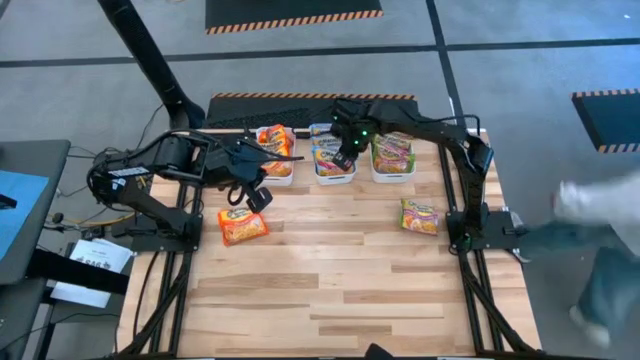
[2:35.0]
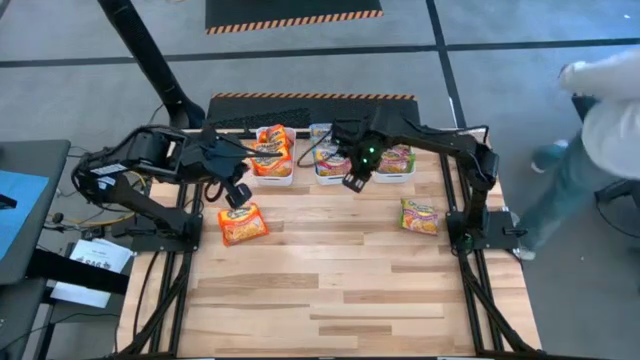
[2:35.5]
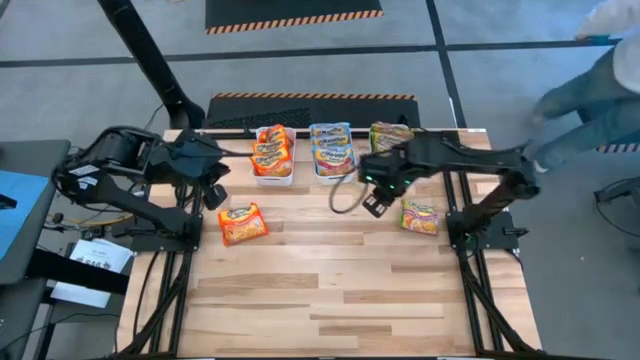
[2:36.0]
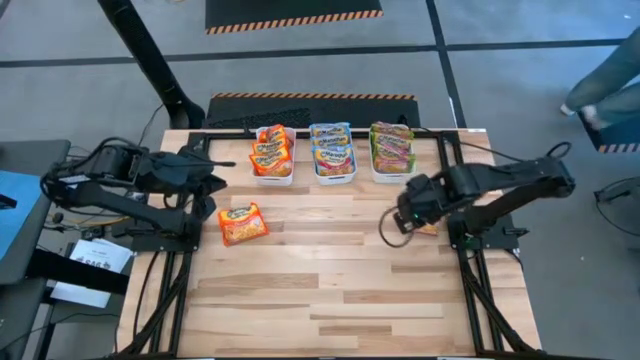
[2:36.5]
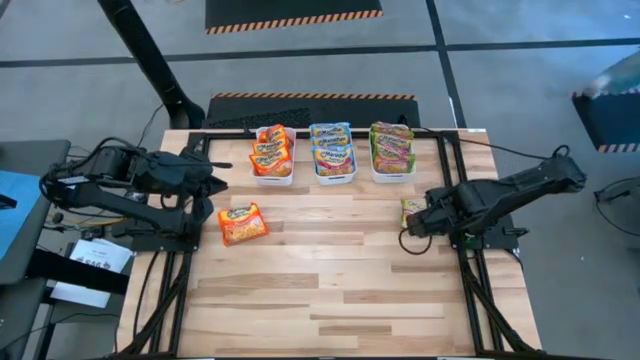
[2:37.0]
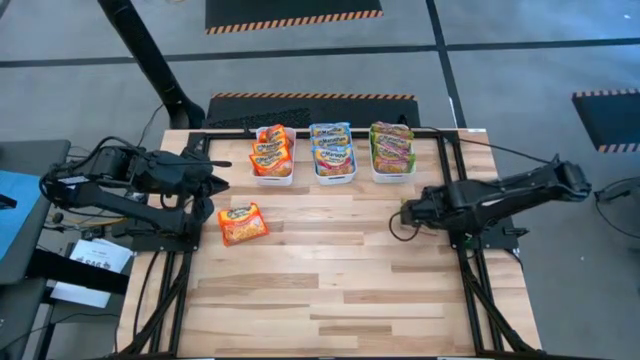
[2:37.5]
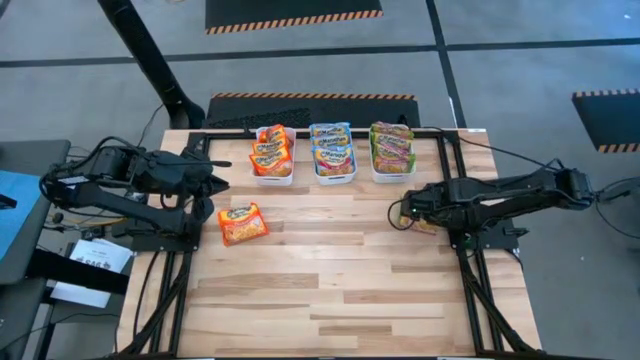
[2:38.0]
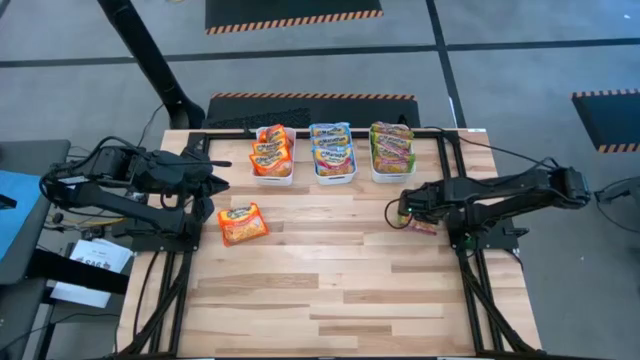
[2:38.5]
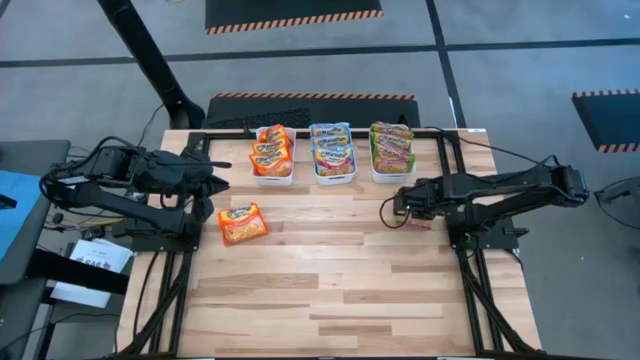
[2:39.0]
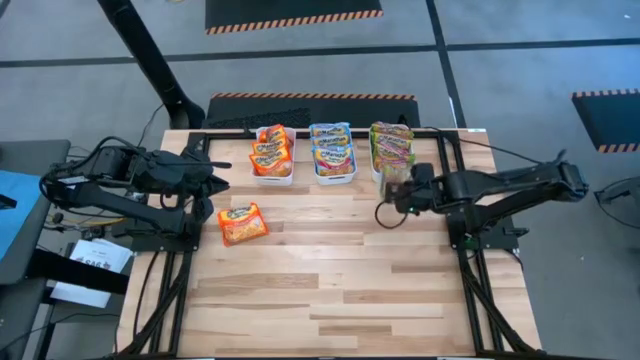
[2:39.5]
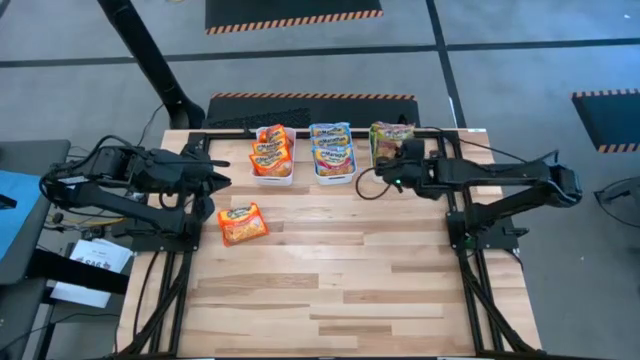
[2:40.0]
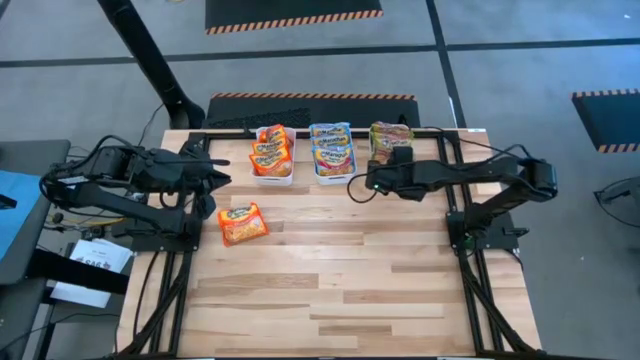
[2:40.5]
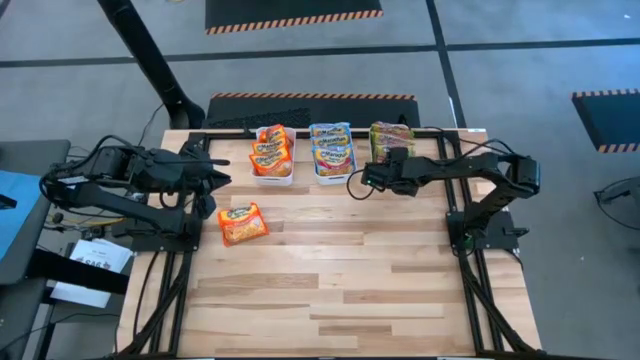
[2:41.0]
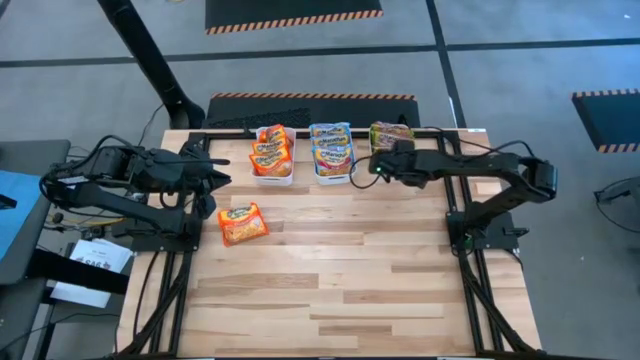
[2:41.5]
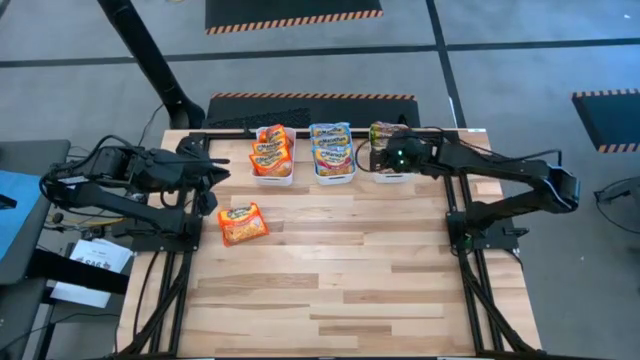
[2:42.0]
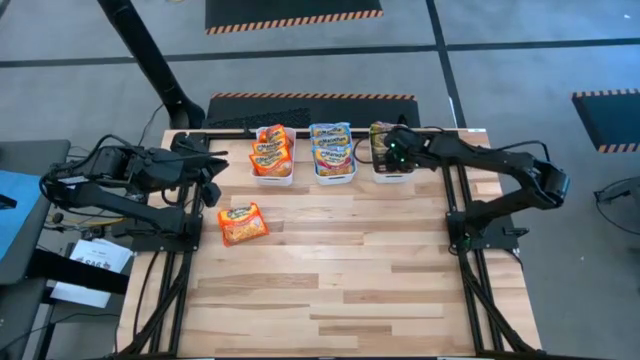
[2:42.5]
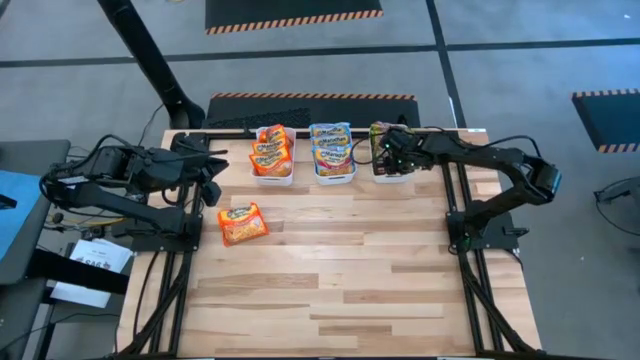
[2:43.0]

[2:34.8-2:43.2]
Task: Sort Maruchan noodles
Put the green noodle pack into the right white bin

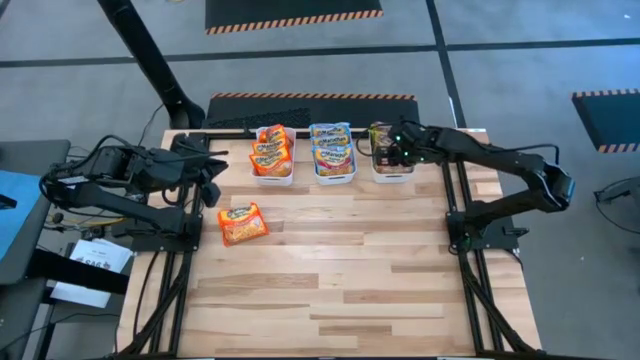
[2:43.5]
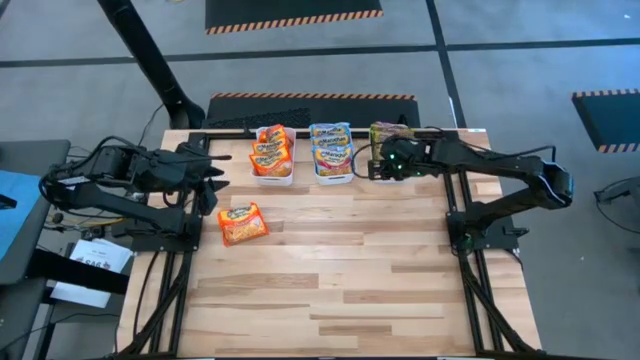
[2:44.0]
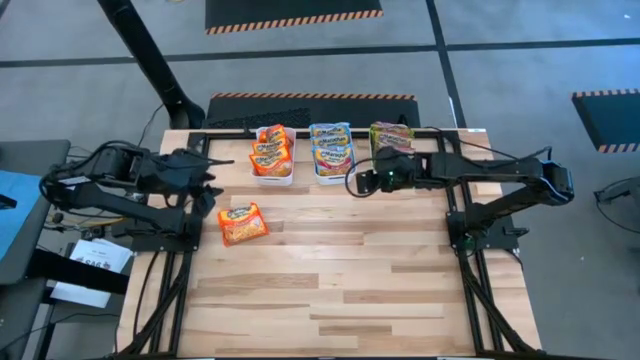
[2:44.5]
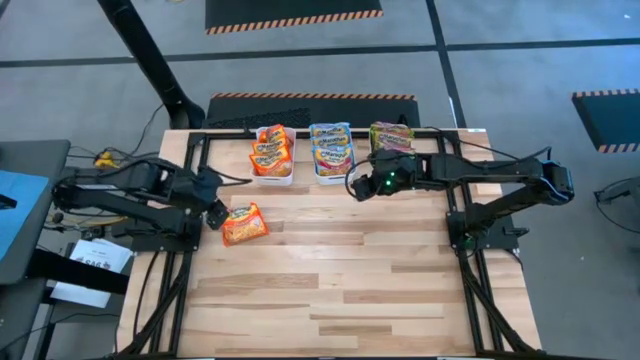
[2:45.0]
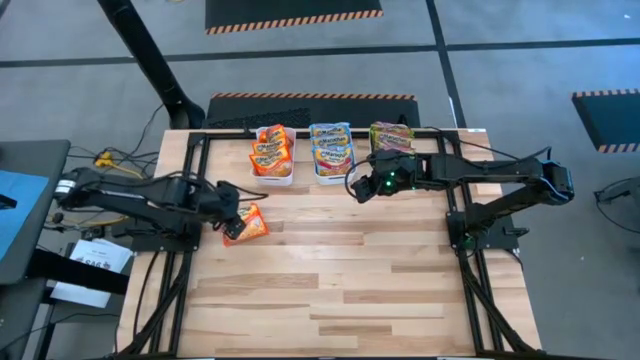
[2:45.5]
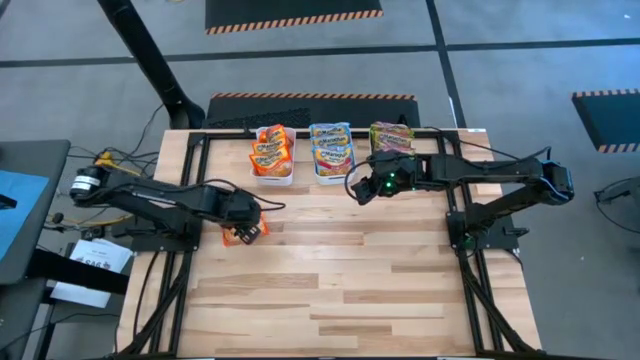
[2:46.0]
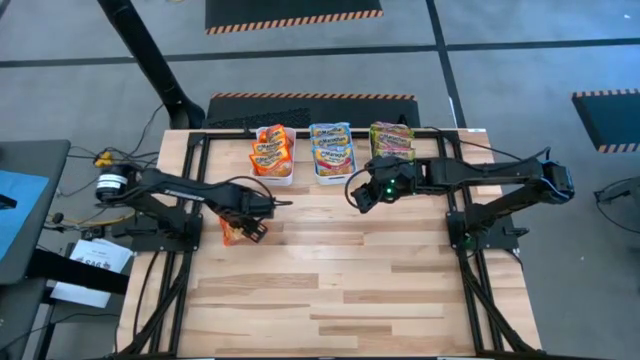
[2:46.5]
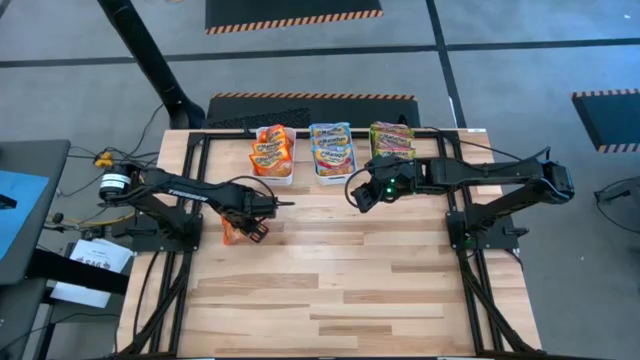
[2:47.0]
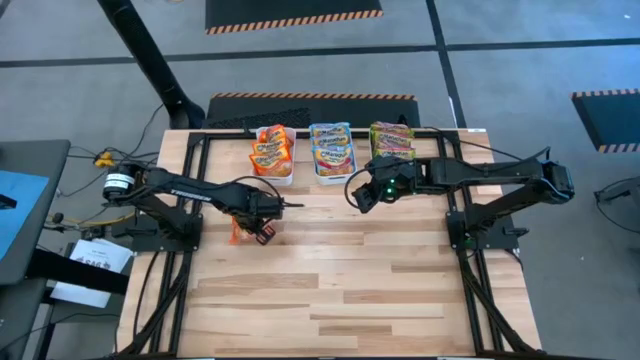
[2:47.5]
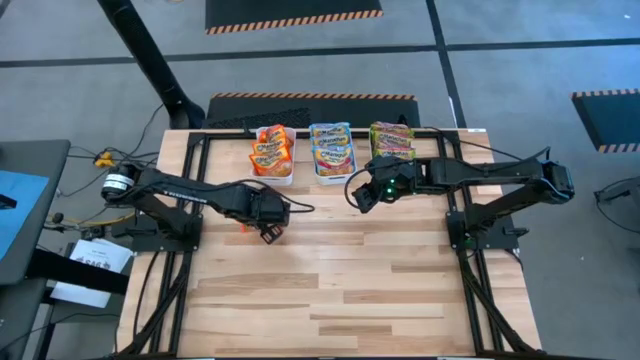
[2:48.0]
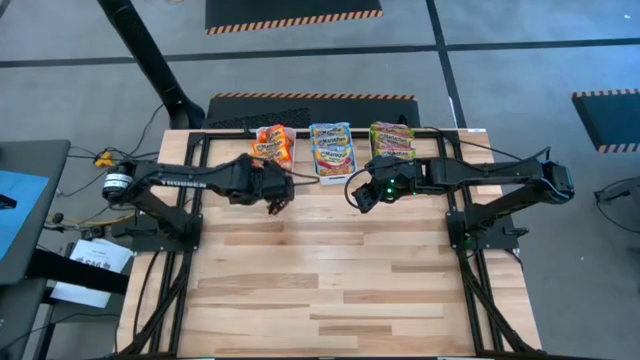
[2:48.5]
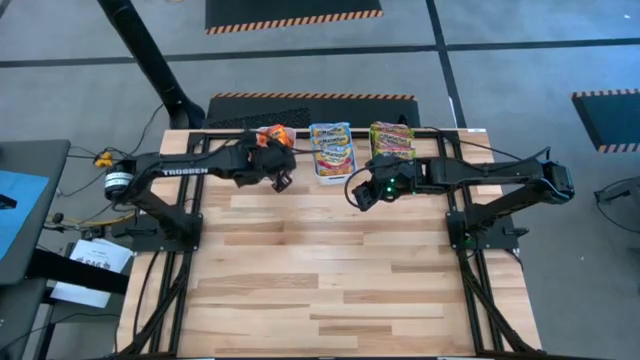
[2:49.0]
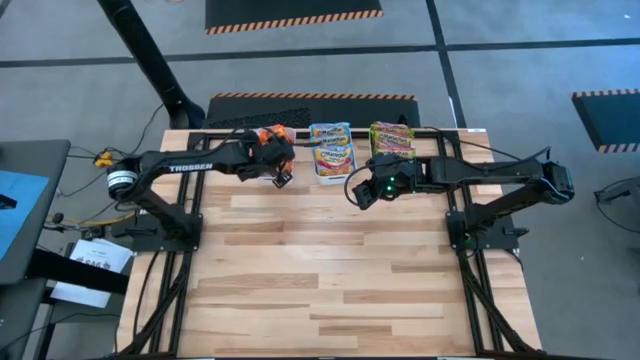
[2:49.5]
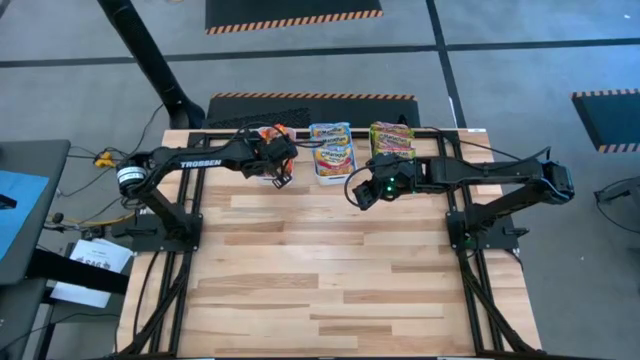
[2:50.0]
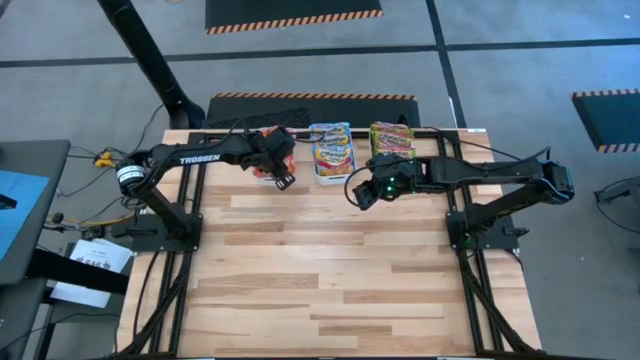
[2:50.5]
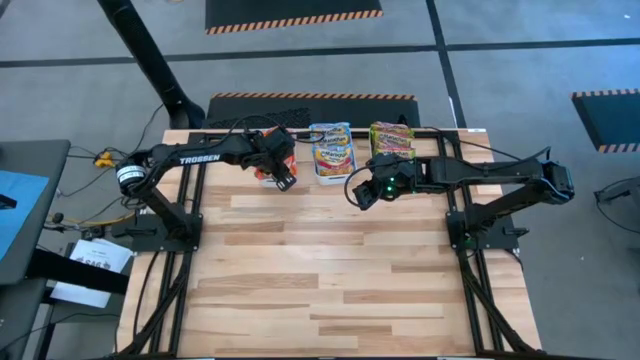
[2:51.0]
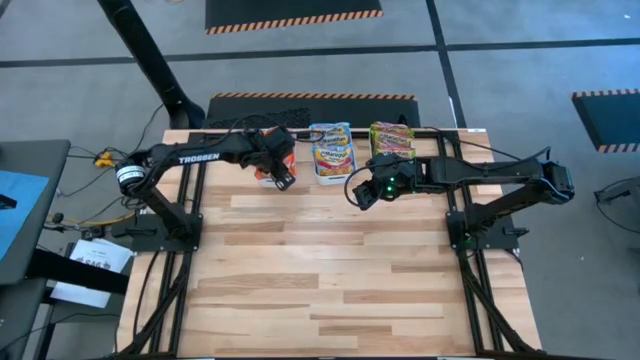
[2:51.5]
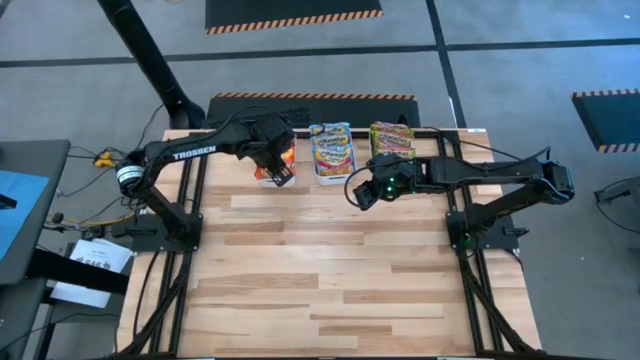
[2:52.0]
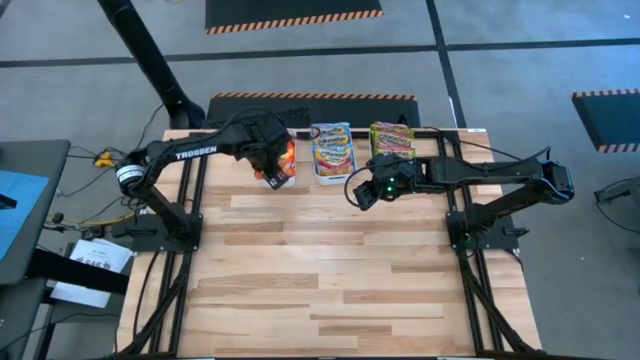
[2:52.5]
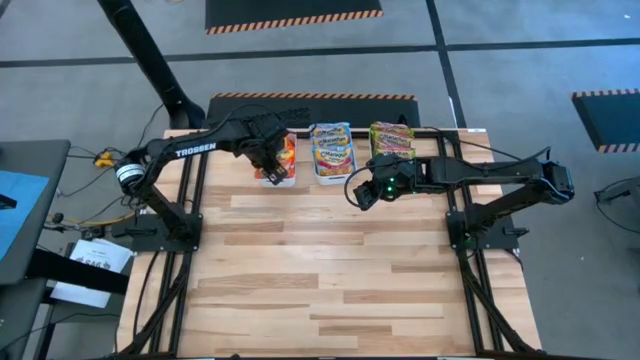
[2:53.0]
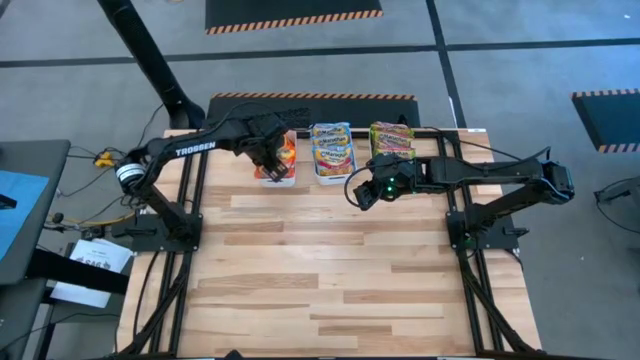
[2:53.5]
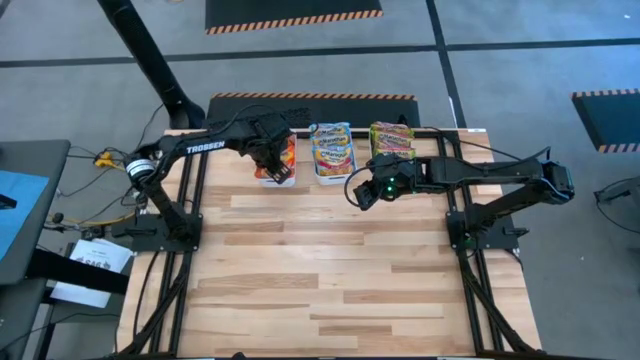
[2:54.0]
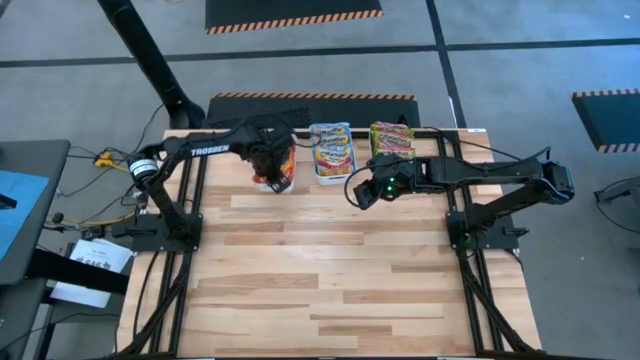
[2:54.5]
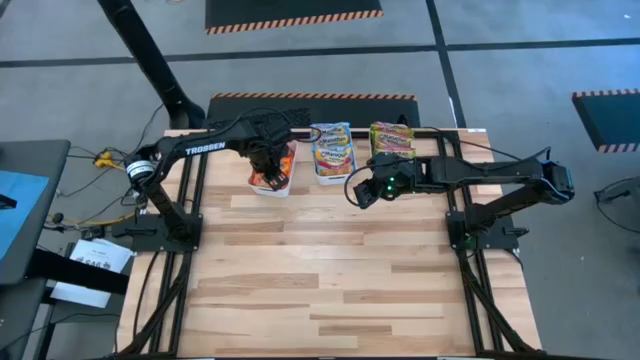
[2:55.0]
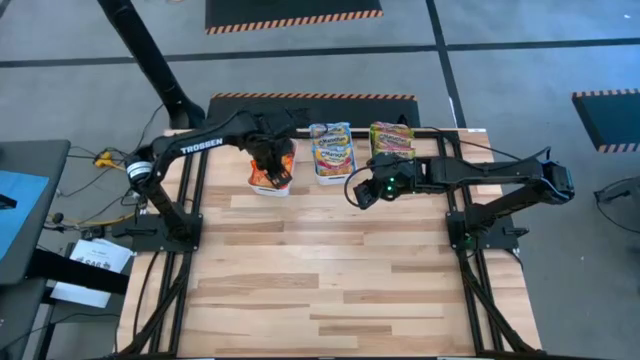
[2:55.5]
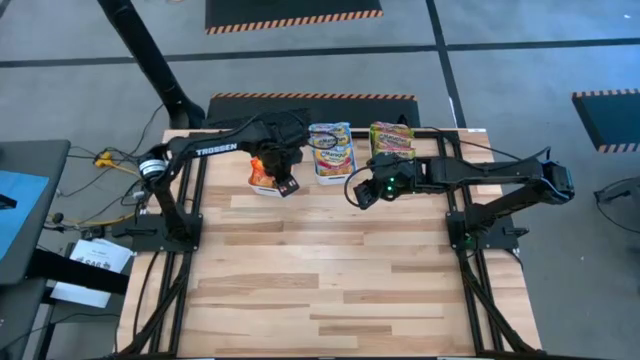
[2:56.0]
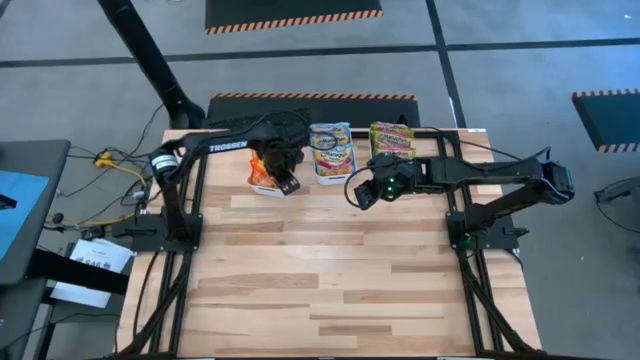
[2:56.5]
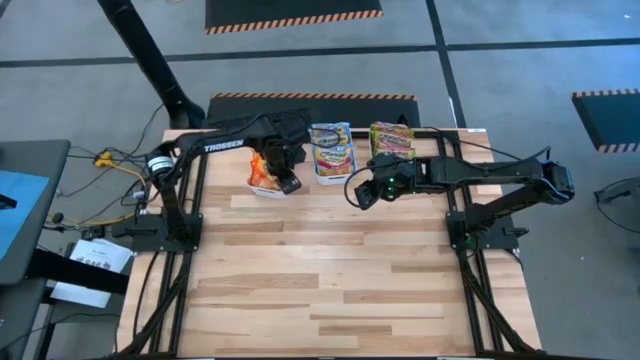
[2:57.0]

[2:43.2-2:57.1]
Put the orange noodle pack into the left white bin
